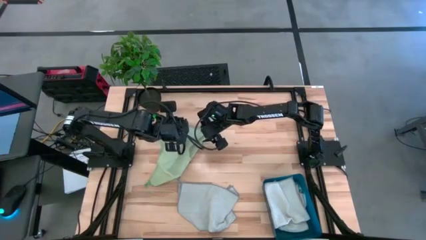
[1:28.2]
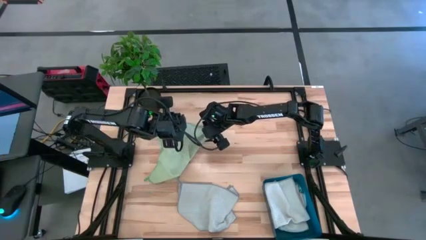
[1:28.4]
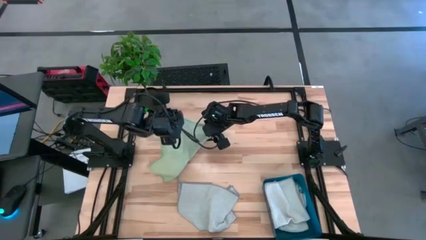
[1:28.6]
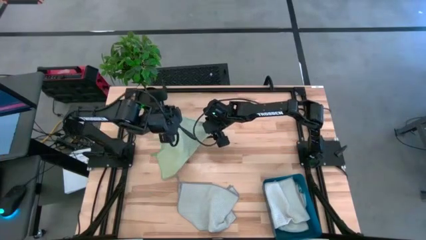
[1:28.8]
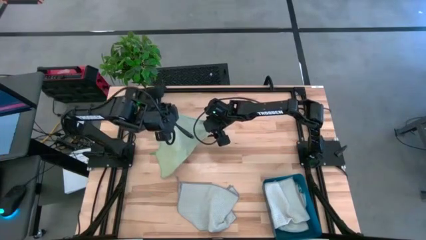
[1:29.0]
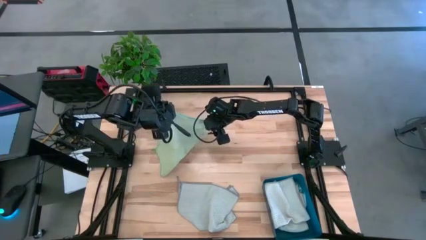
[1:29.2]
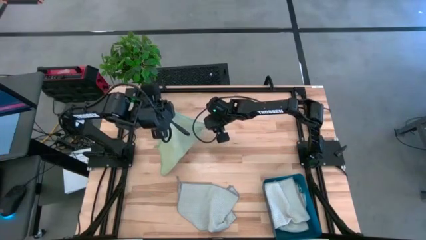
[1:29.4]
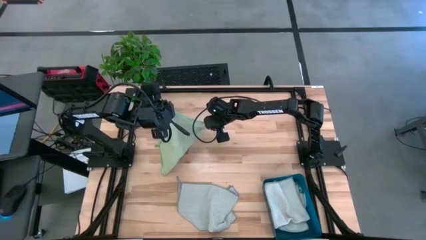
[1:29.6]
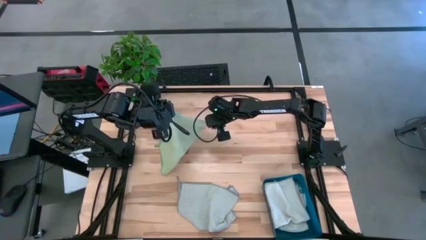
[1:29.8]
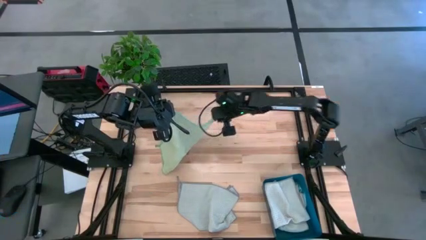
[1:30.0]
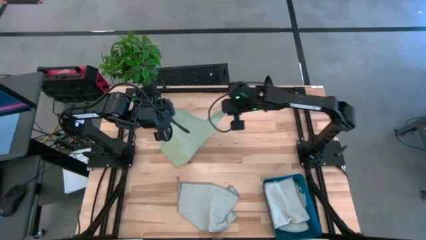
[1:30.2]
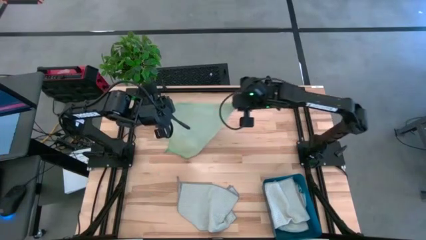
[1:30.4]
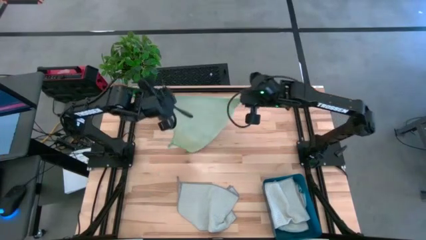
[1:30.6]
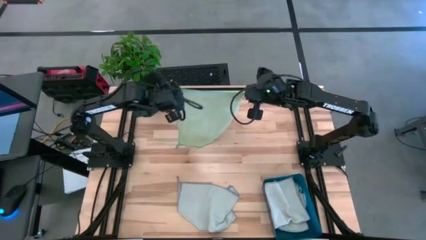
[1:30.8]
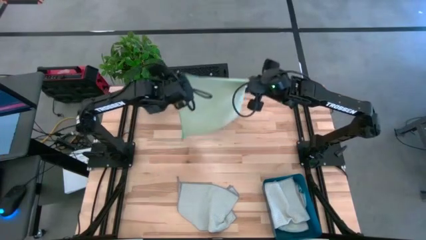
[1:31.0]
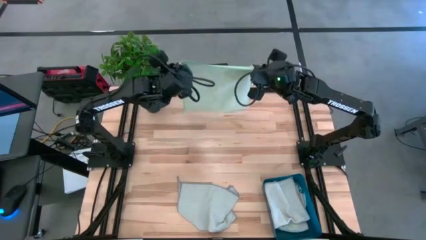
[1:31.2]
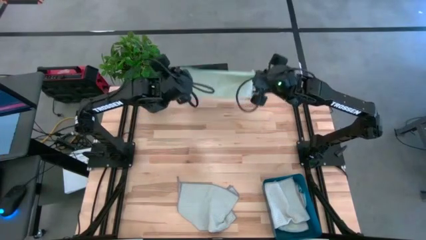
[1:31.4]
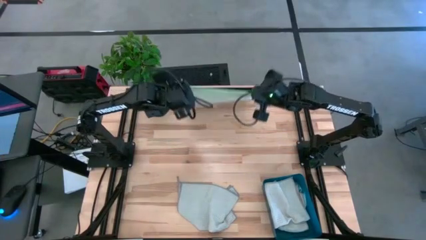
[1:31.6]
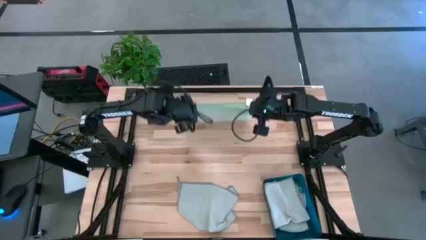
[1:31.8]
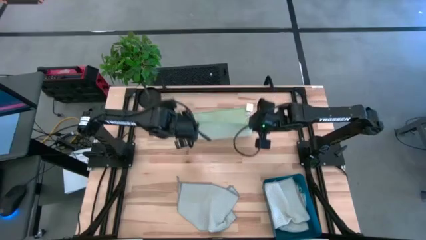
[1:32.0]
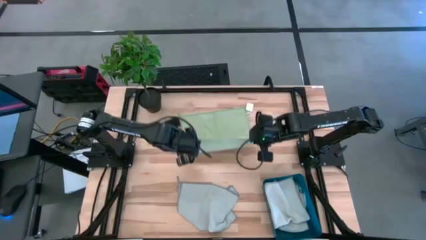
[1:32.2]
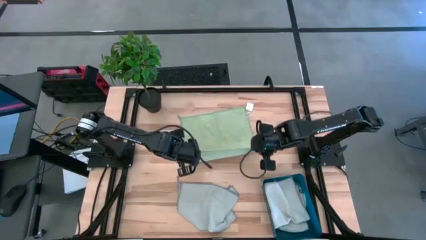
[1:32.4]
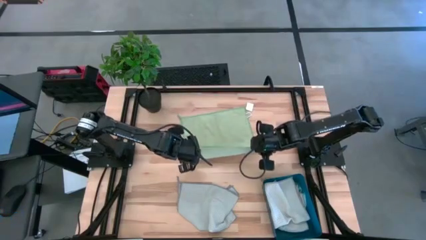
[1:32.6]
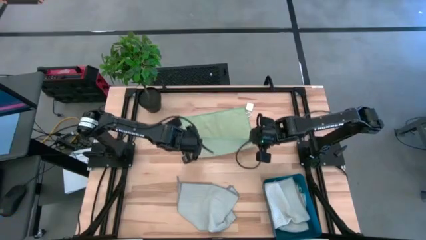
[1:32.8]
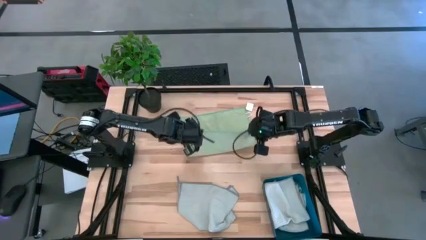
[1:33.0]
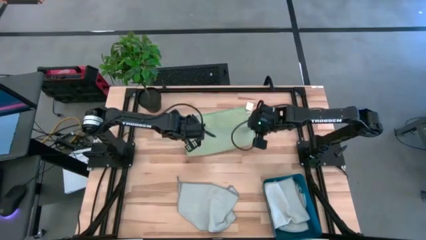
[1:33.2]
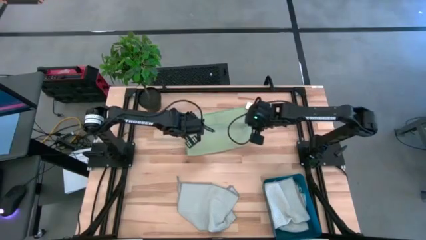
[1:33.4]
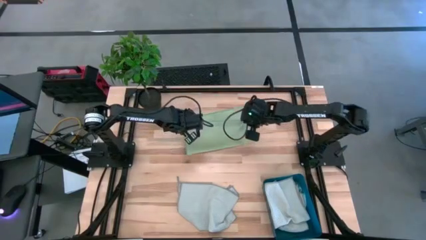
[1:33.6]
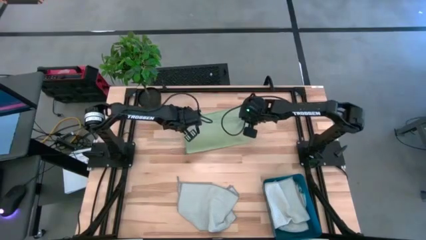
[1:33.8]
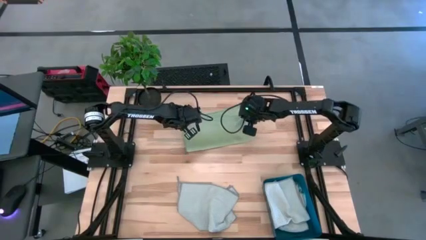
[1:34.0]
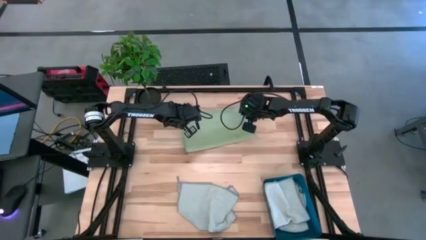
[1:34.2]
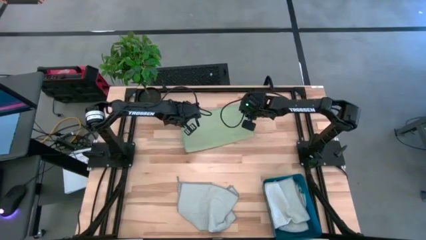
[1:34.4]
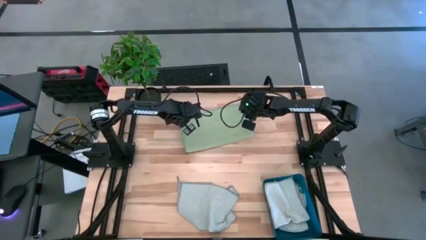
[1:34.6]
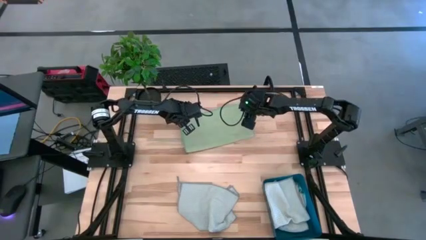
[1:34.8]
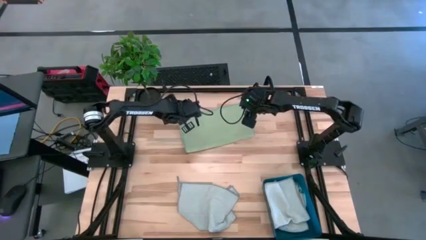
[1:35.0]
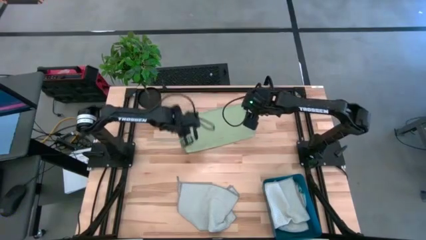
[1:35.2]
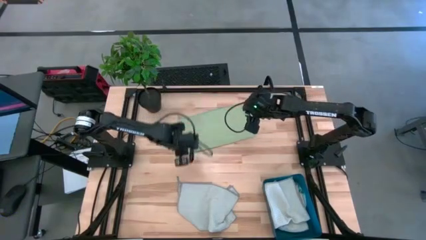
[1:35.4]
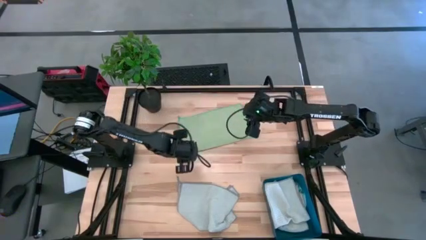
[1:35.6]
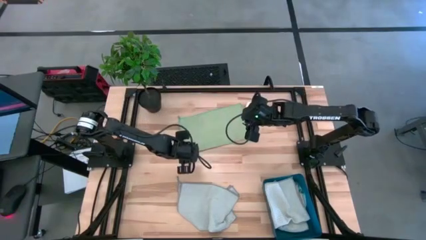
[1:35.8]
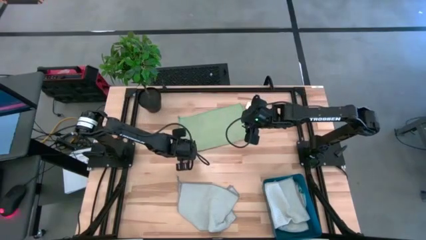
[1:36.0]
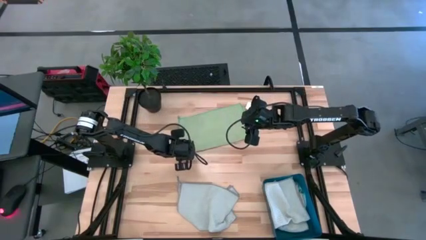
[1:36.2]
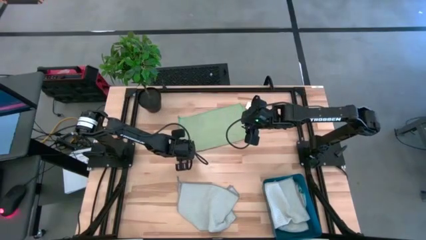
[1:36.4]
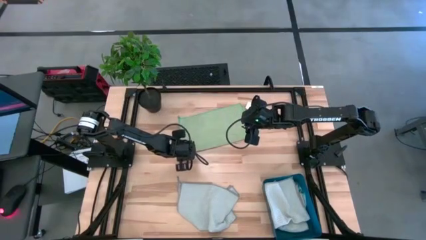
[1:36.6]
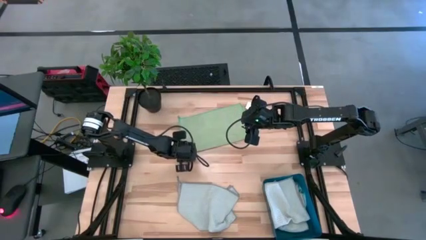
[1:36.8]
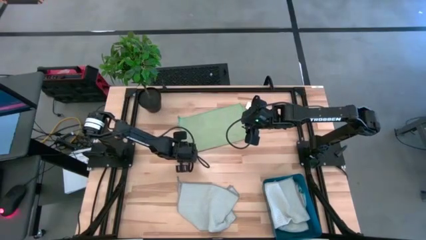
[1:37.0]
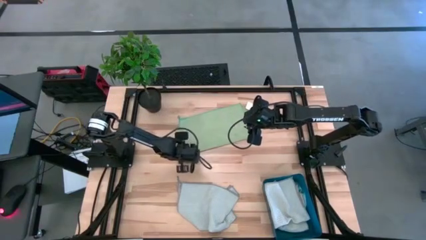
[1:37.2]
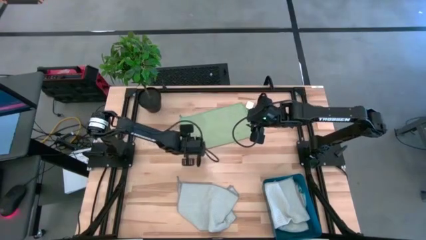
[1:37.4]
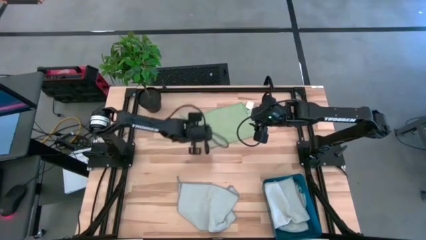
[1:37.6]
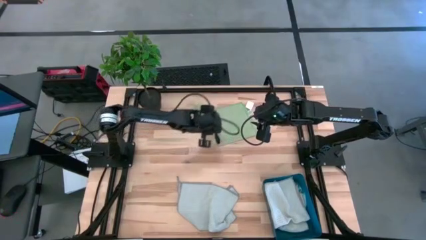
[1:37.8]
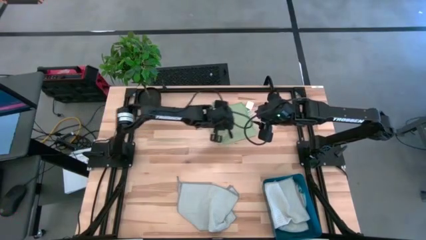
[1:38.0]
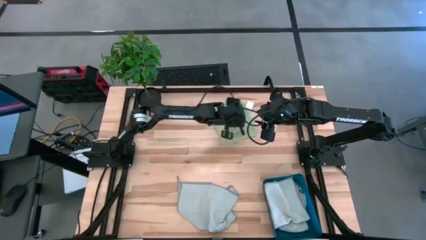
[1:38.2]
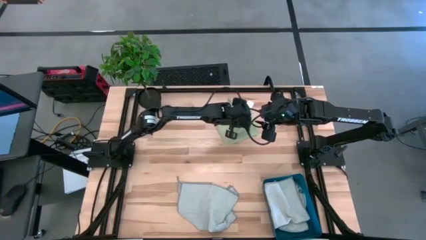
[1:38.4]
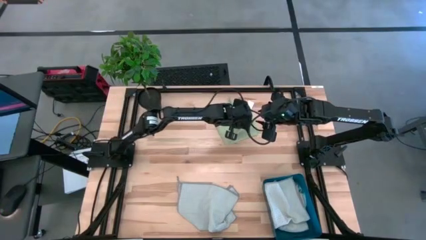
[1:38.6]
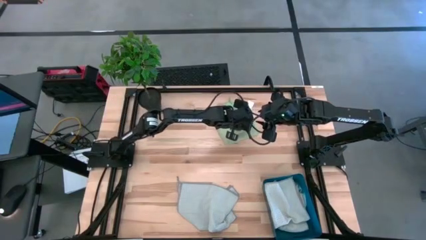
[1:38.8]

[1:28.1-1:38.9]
Task: Fold microfiber towels
Fold the green microfiber towel

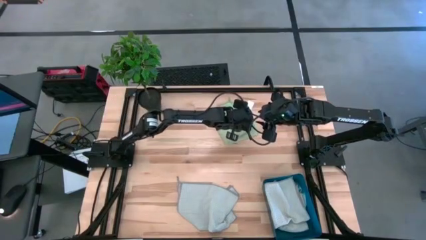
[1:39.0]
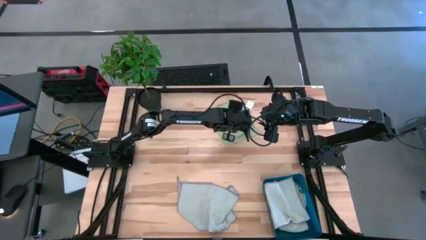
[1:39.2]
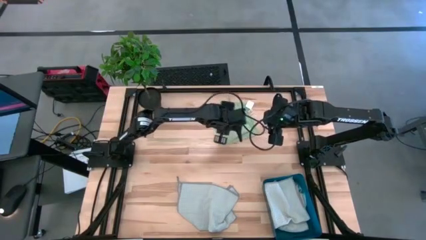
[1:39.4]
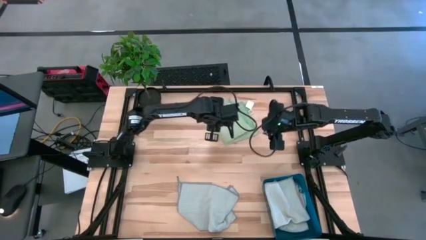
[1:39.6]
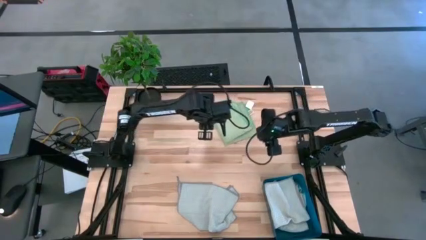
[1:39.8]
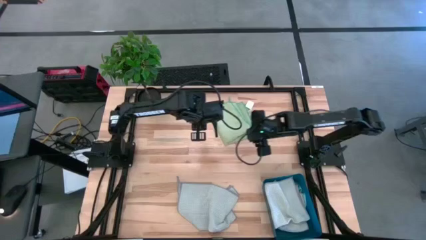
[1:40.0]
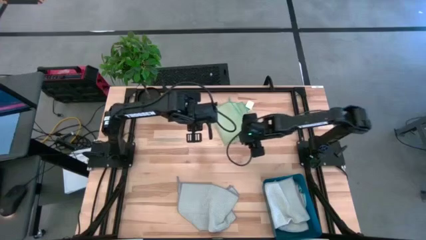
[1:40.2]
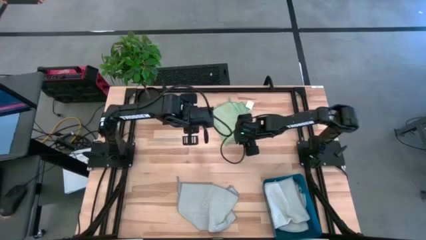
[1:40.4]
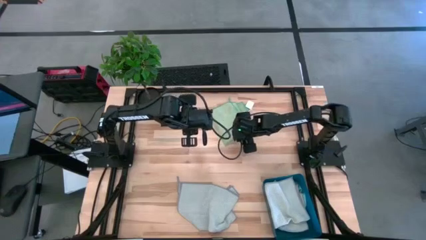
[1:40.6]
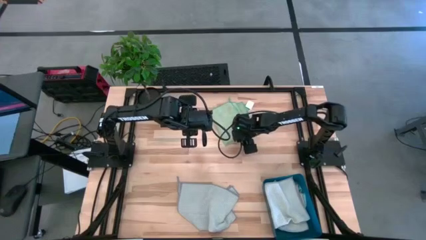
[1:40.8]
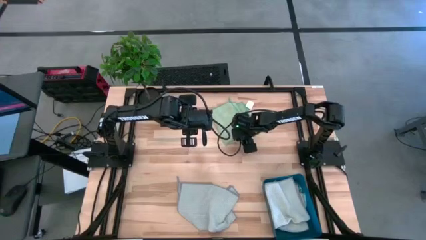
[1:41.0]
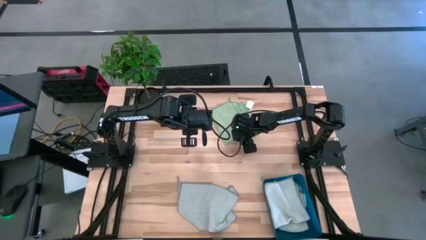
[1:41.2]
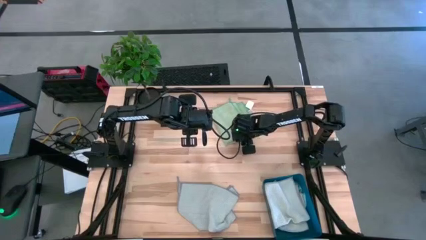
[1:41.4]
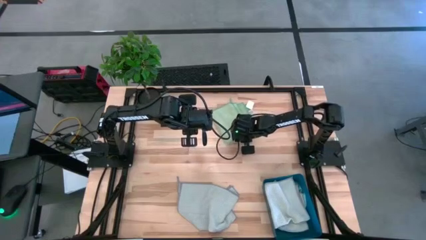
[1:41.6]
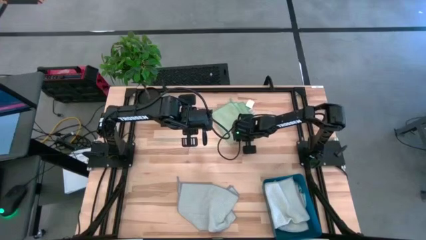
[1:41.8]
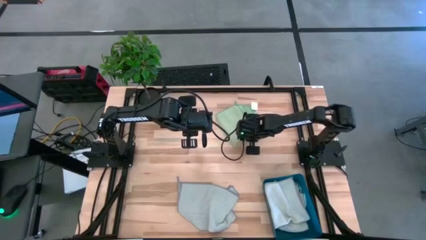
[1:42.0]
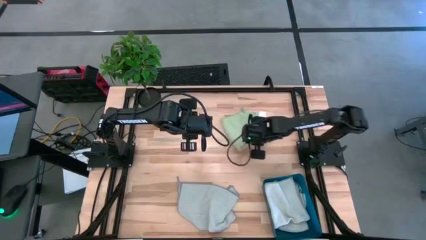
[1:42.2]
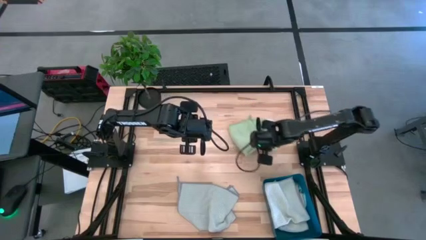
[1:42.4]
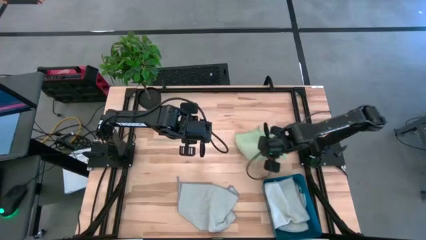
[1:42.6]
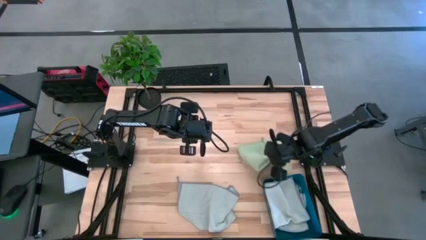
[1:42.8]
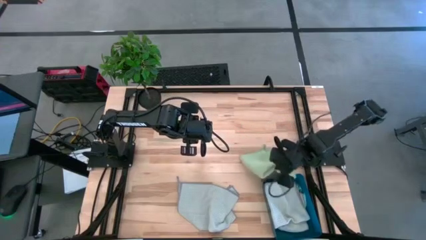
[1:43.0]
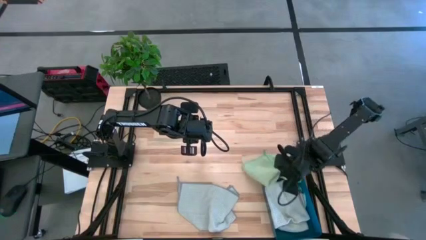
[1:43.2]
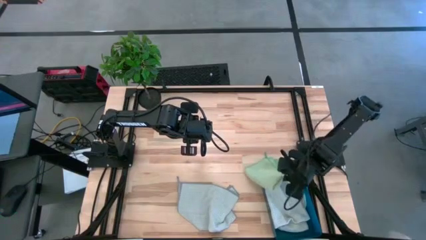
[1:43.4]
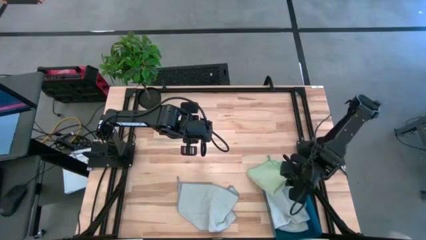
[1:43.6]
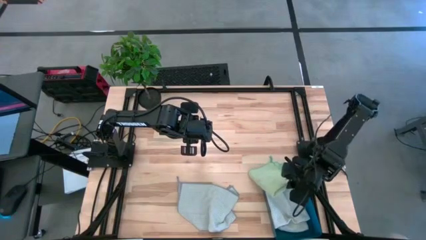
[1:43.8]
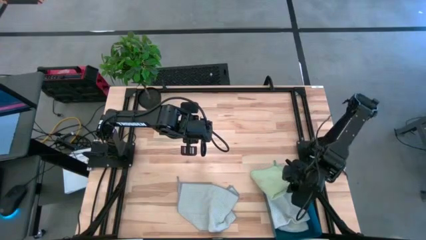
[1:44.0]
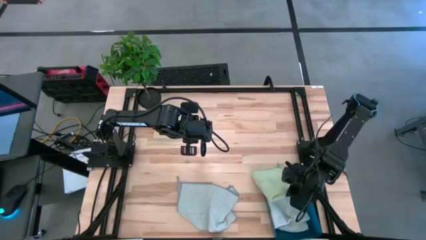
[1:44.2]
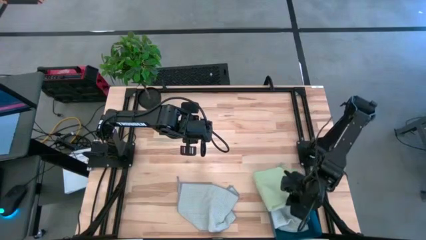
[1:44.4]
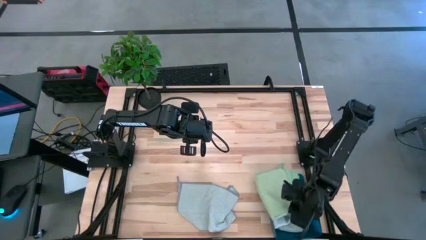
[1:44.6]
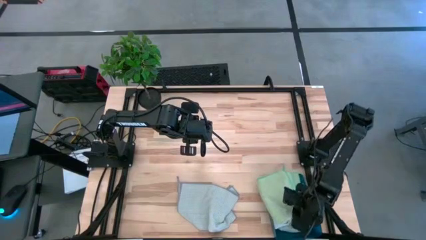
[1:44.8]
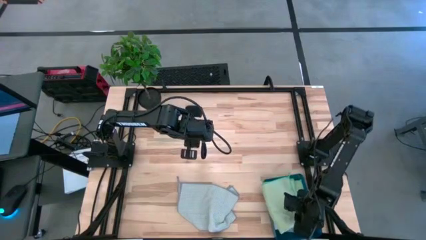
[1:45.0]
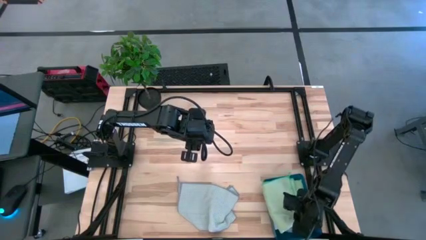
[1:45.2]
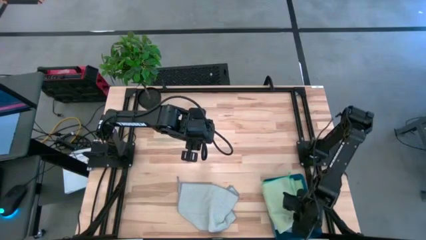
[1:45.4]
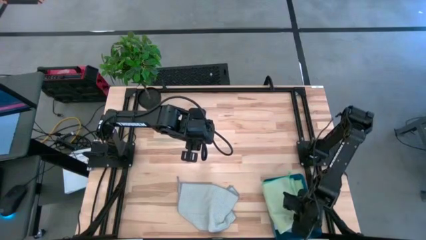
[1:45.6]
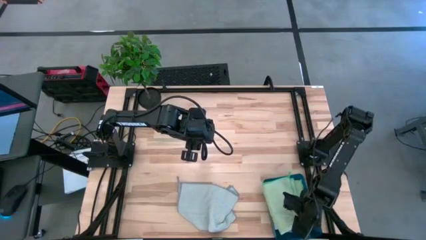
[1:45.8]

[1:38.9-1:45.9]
Put the green microfiber towel into the blue bin
